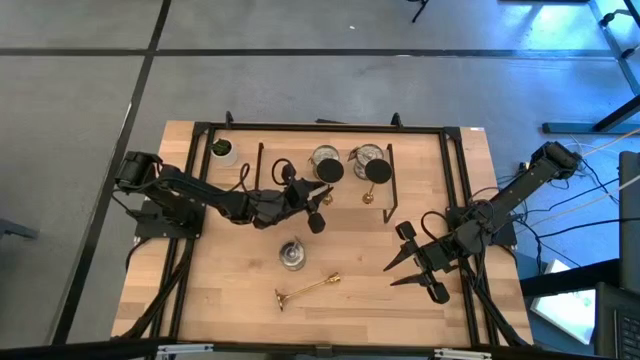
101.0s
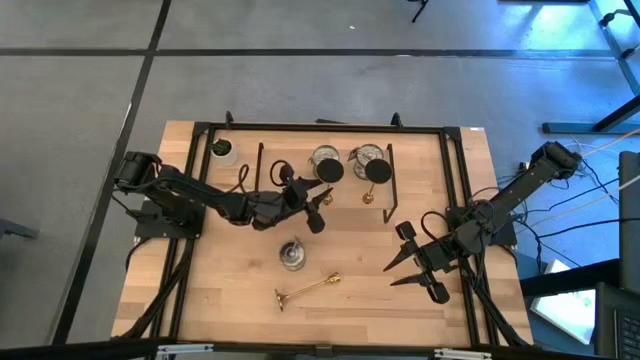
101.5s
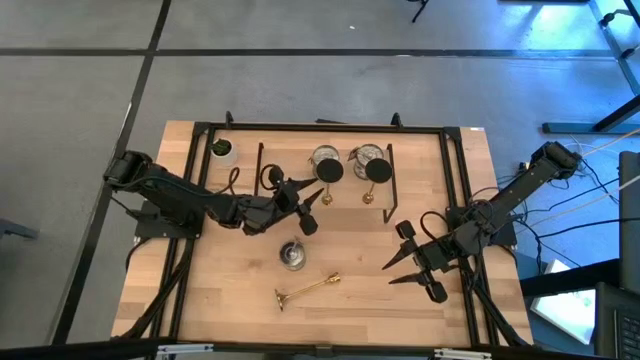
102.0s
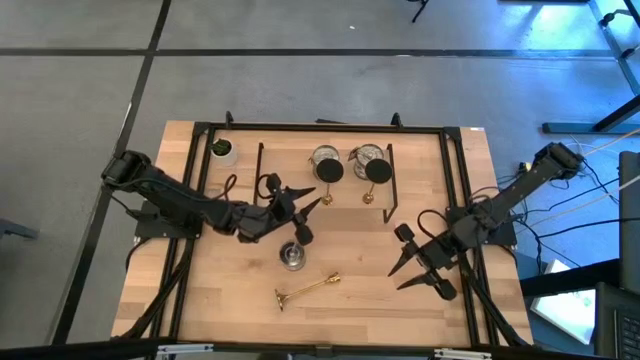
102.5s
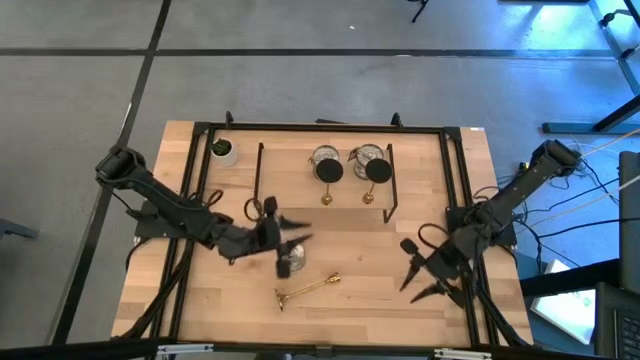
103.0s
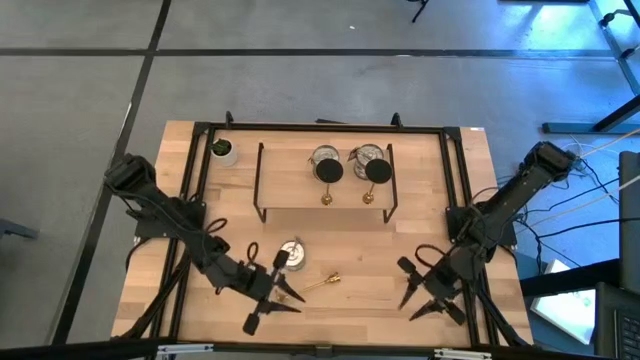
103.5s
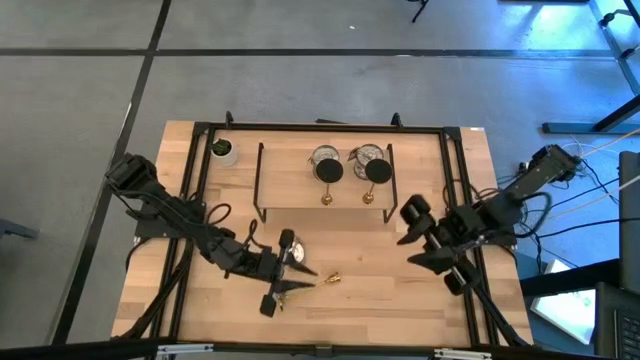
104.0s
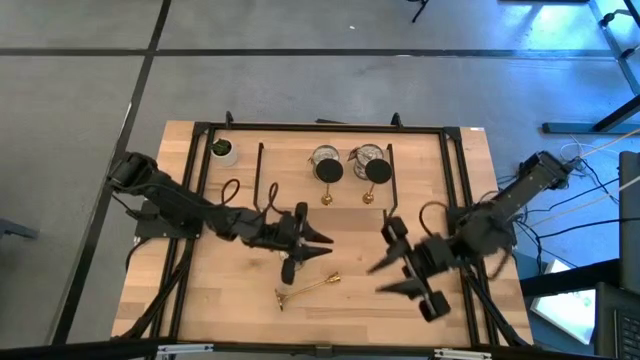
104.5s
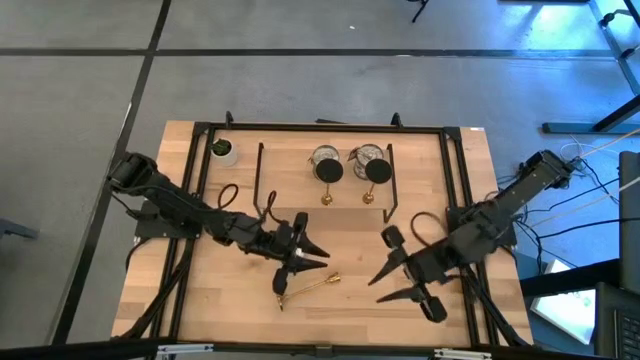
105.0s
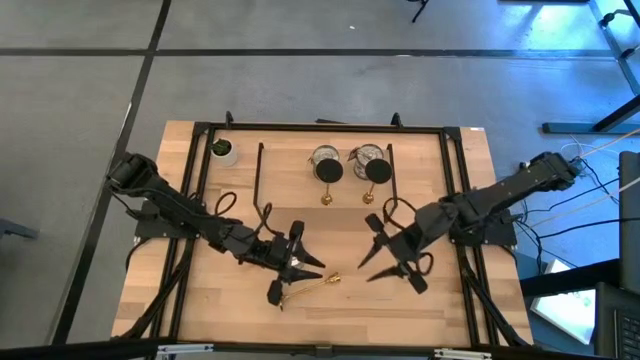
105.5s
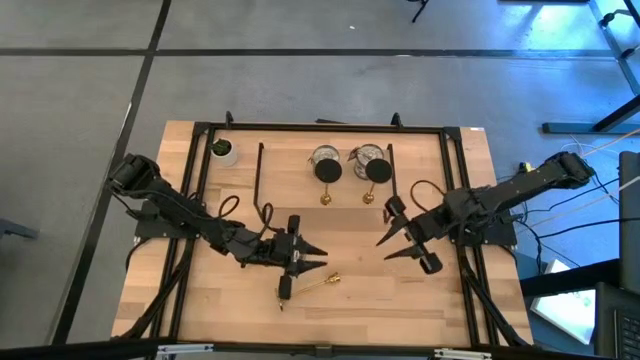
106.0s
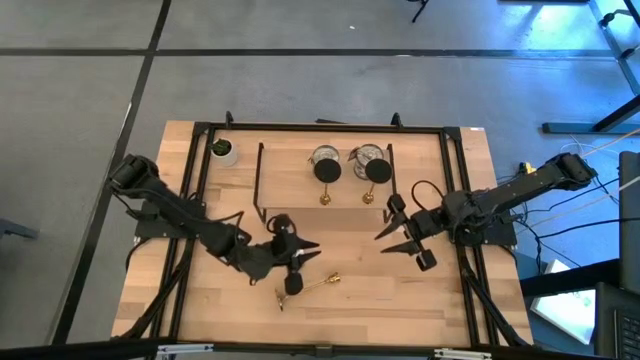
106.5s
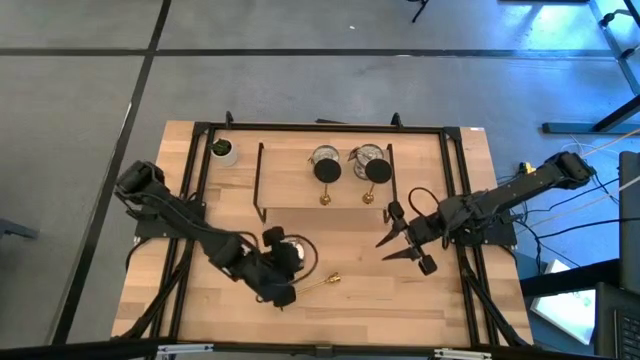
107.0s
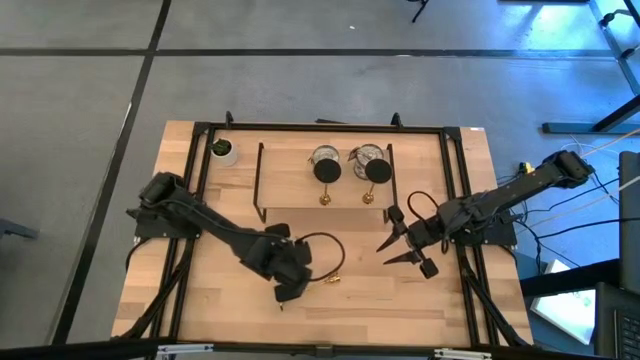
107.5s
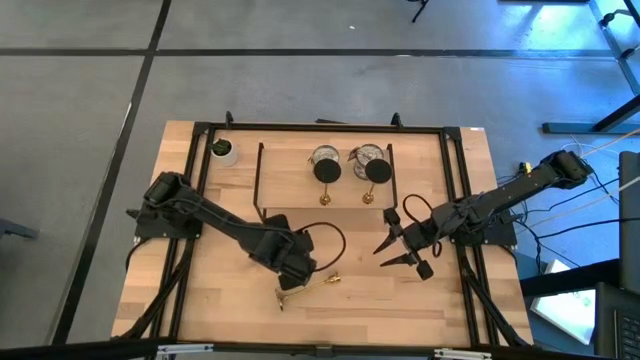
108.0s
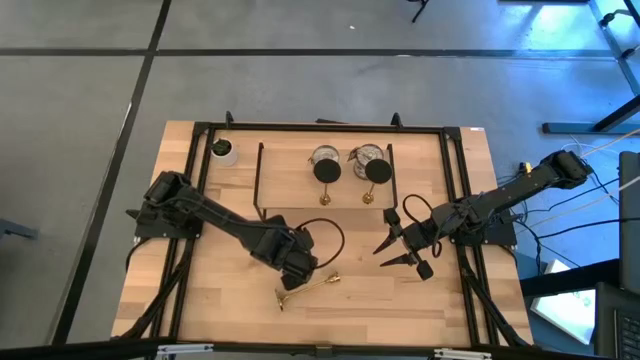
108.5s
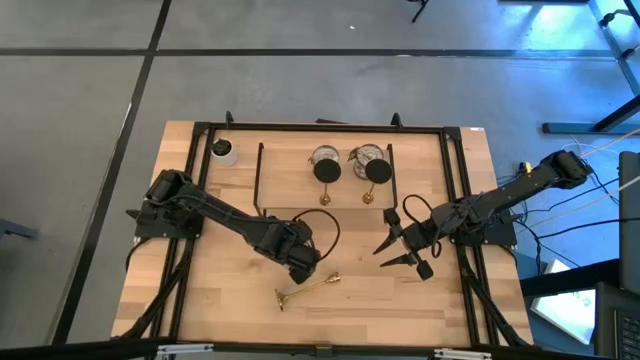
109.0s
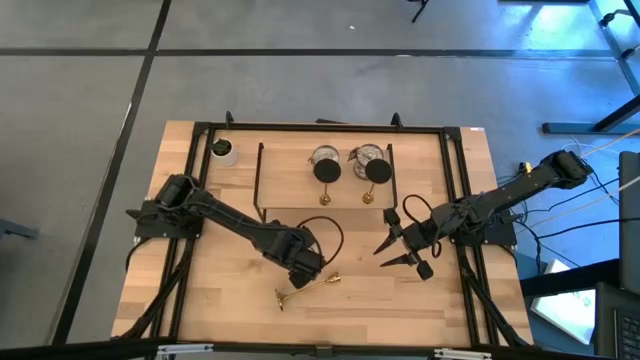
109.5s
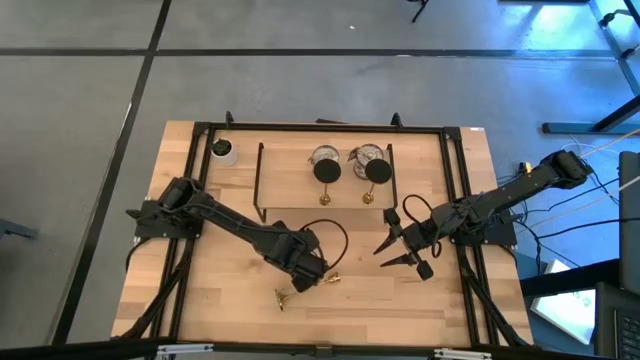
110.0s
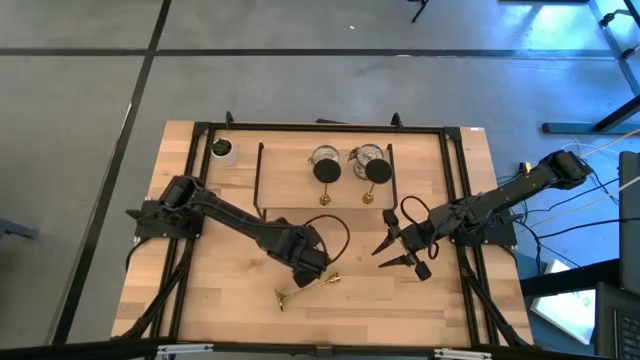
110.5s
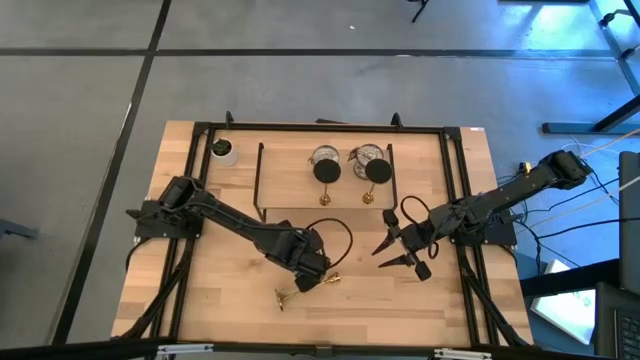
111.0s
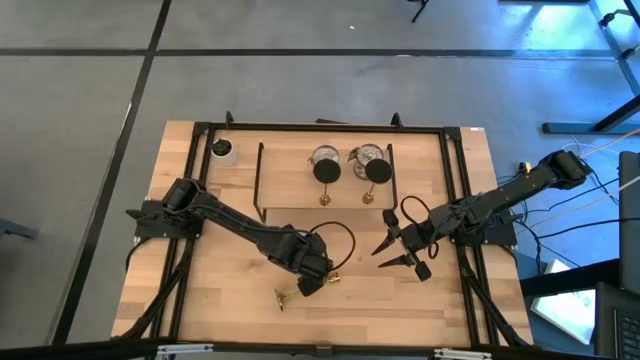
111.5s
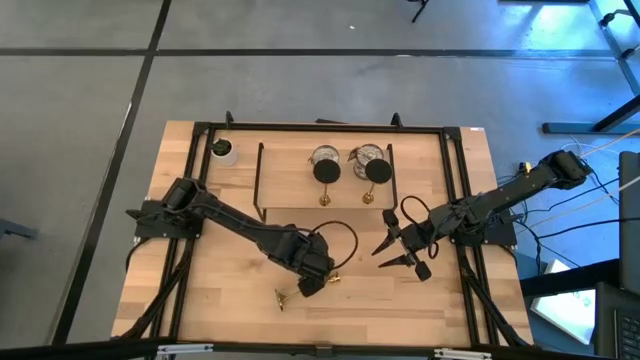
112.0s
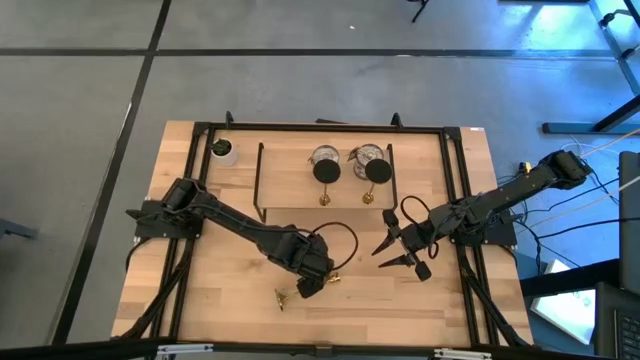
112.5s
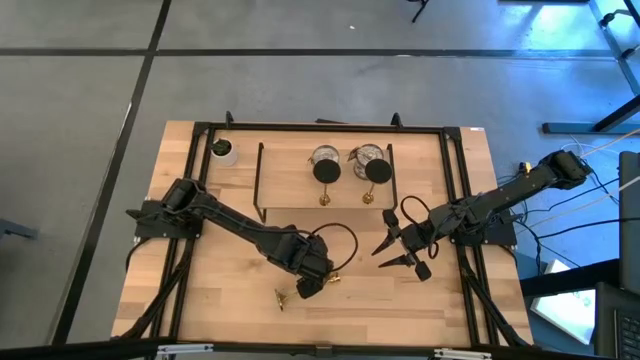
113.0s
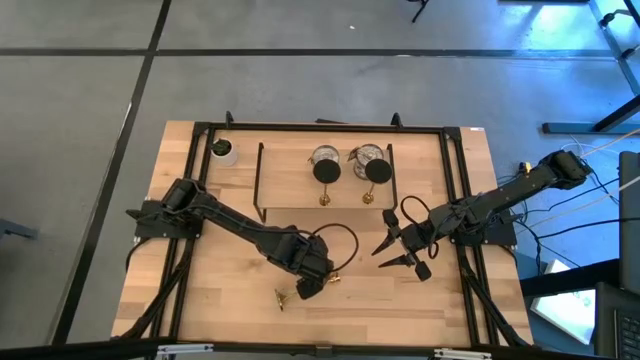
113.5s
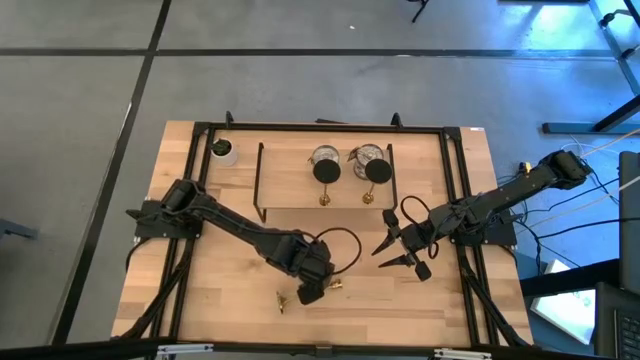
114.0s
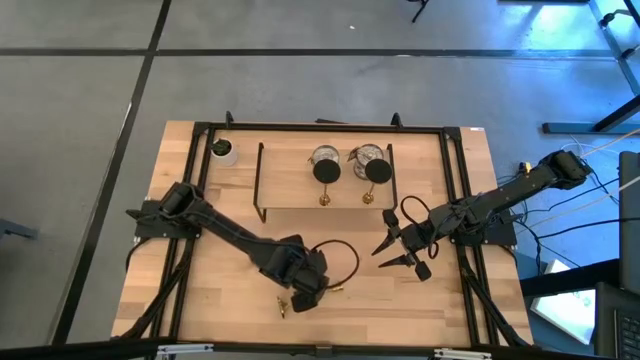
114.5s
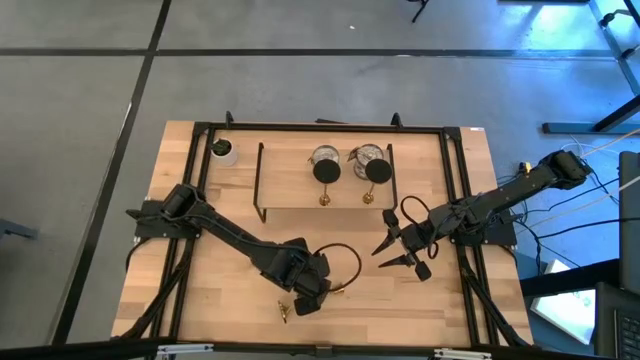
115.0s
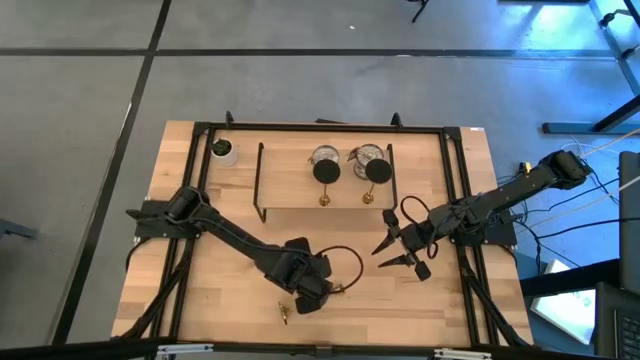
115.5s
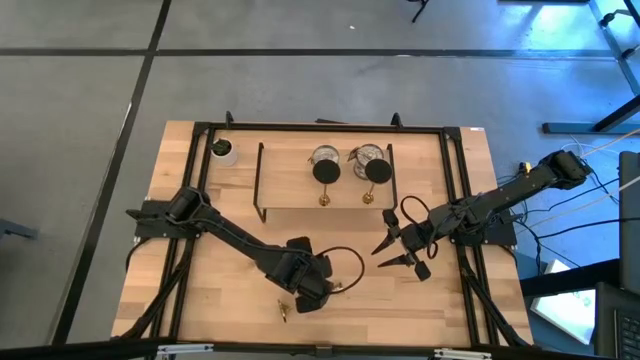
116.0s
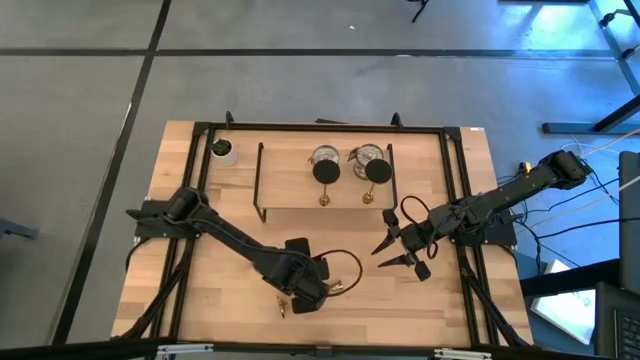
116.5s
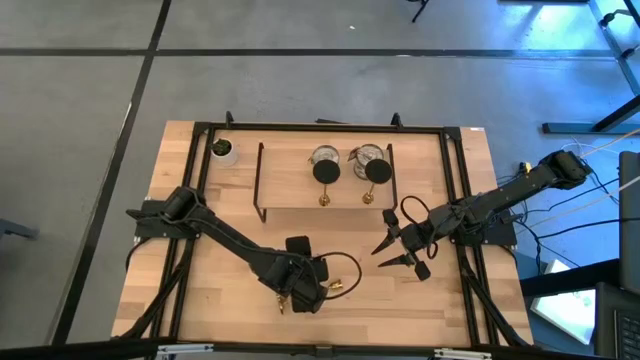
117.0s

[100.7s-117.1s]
Task: Pick & Place candle stick holders
Put the silver scented candle on the shelf

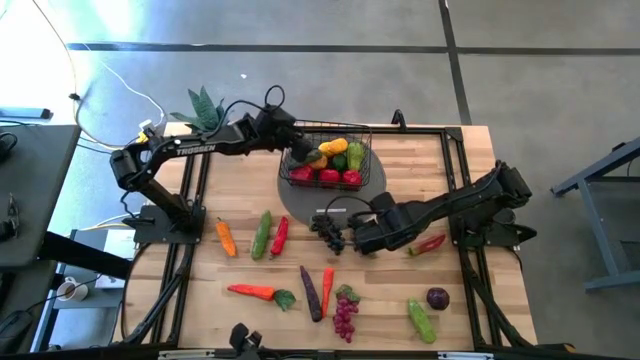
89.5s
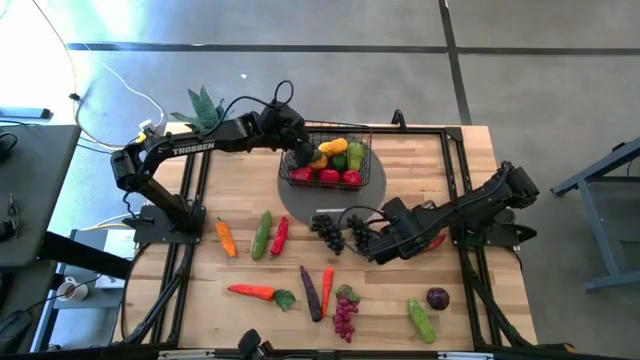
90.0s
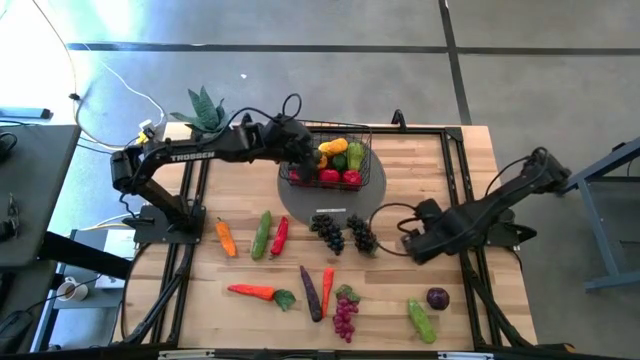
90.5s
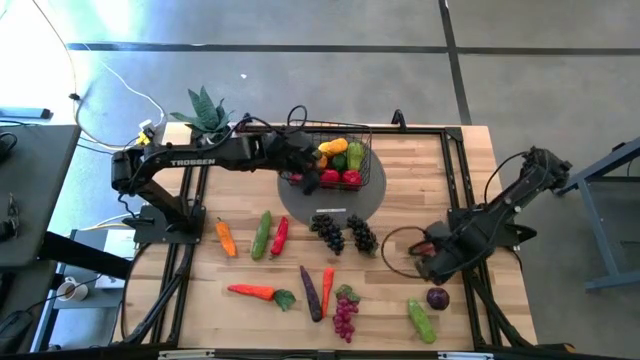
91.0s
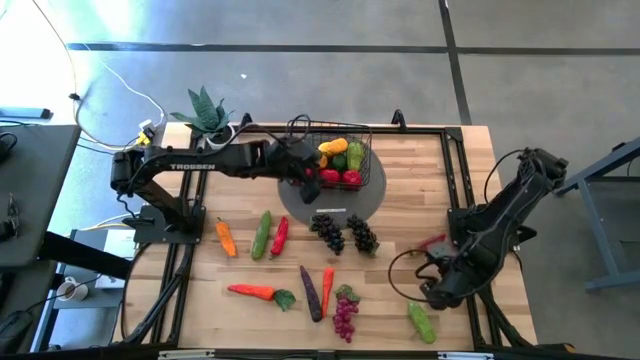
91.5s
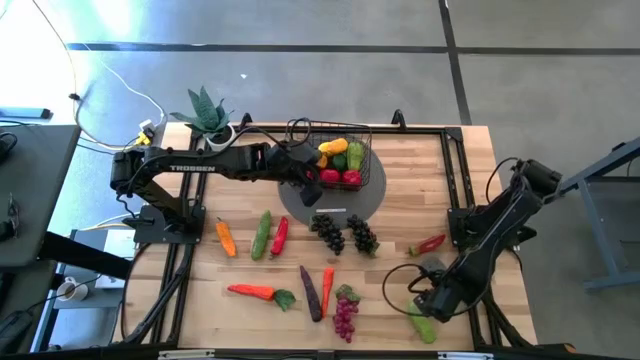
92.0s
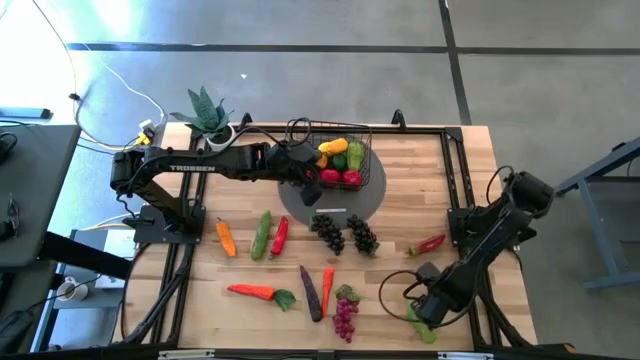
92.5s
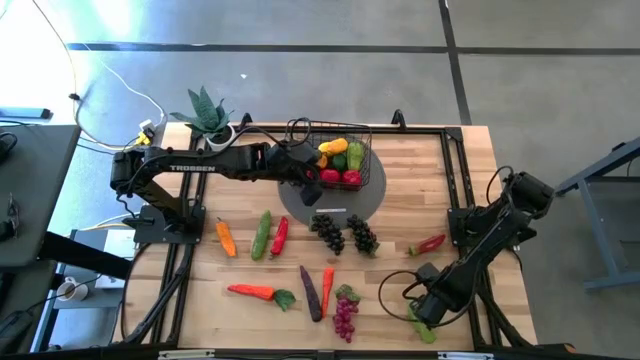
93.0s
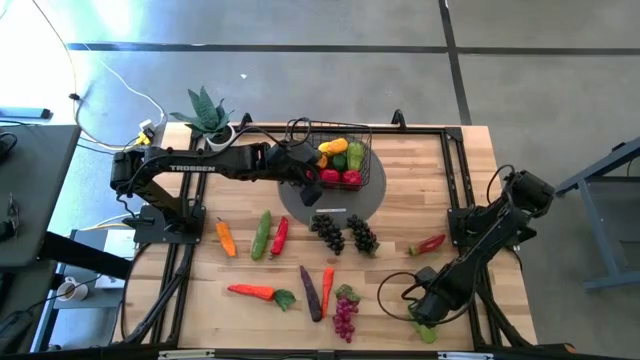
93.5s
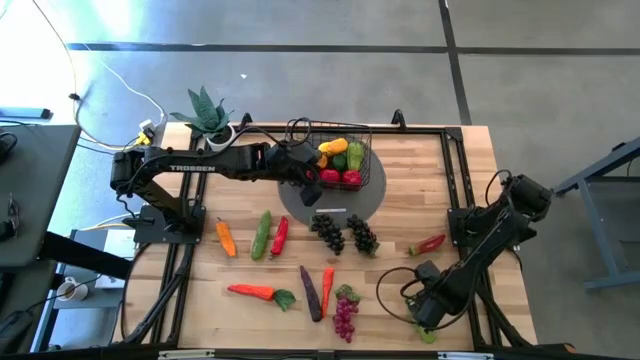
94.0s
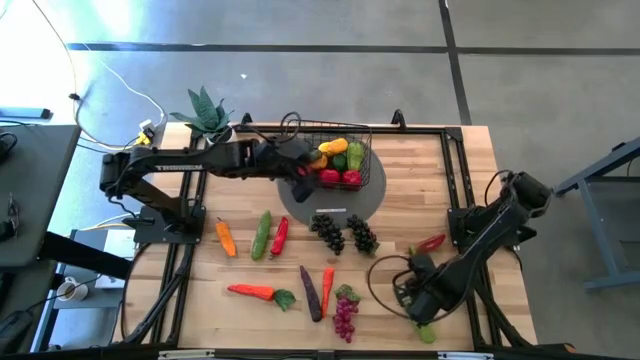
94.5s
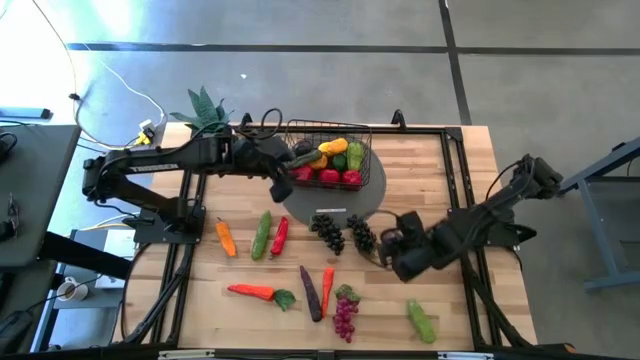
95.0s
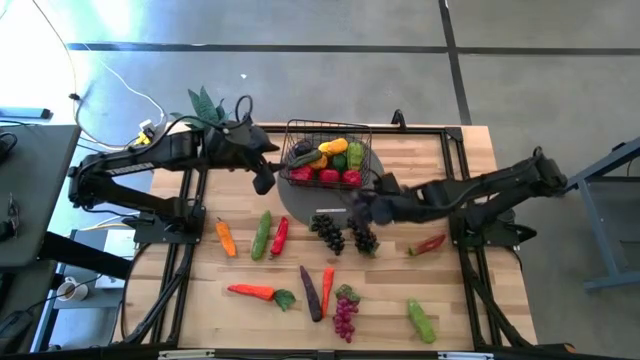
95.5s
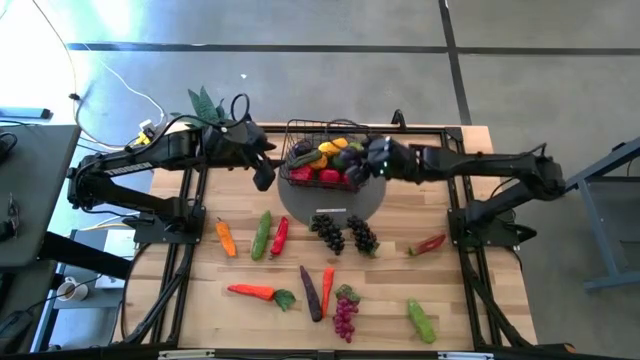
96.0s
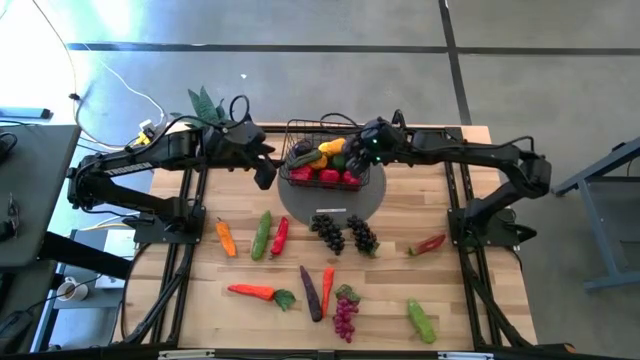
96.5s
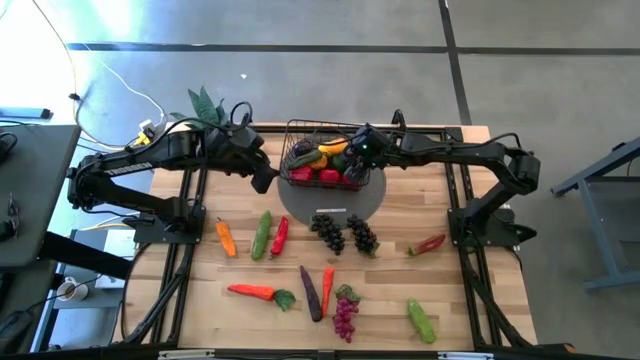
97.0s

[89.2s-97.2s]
Task: Build produce basket
Put the purple plum into the wire basket
